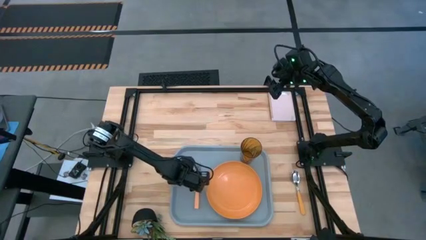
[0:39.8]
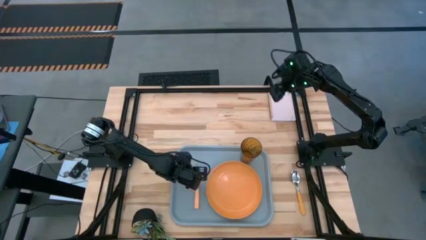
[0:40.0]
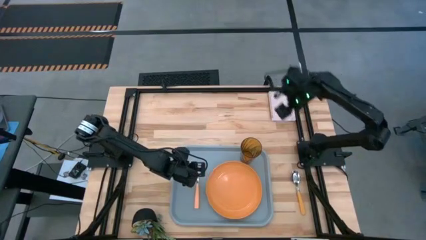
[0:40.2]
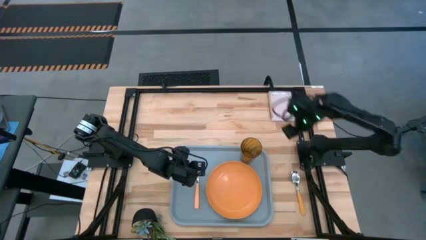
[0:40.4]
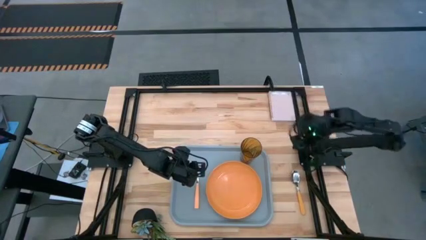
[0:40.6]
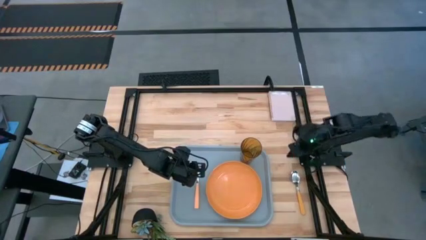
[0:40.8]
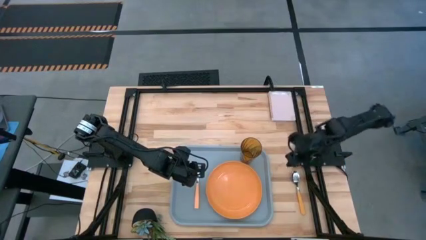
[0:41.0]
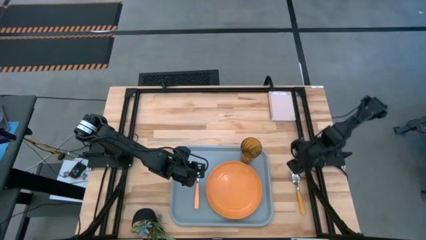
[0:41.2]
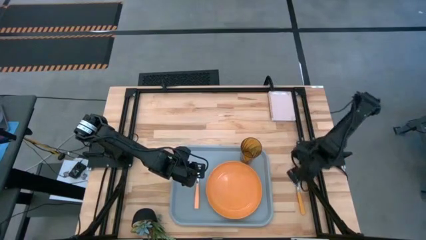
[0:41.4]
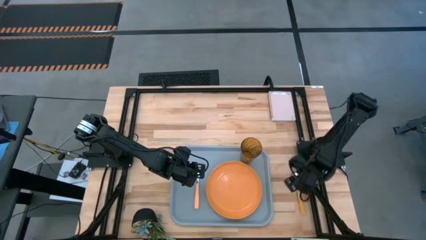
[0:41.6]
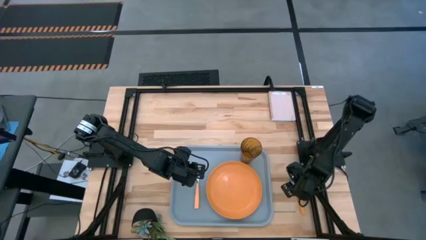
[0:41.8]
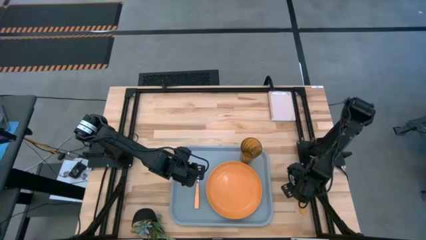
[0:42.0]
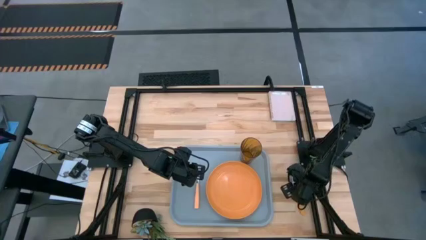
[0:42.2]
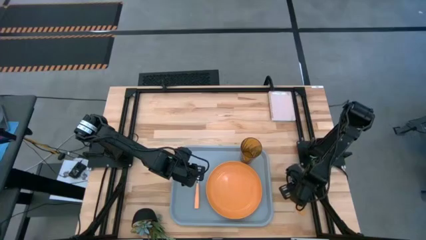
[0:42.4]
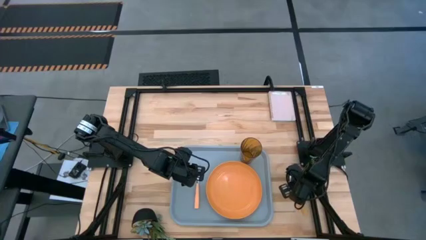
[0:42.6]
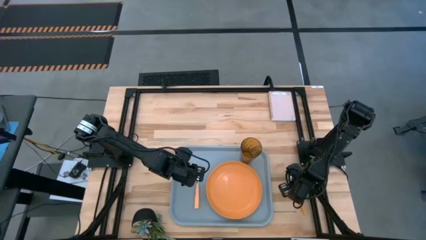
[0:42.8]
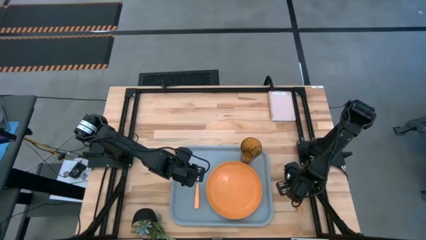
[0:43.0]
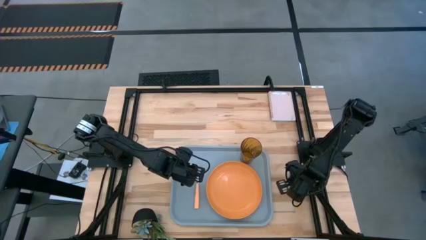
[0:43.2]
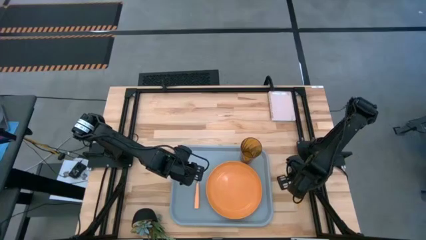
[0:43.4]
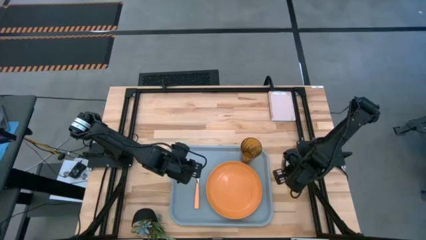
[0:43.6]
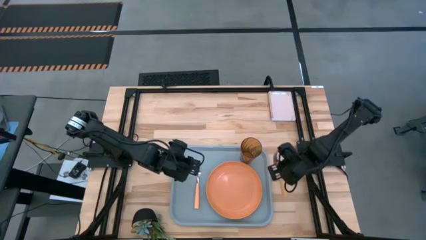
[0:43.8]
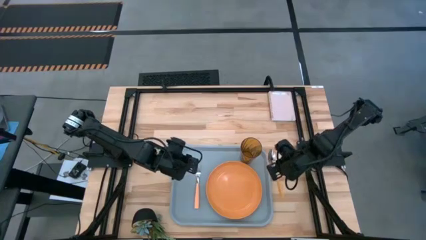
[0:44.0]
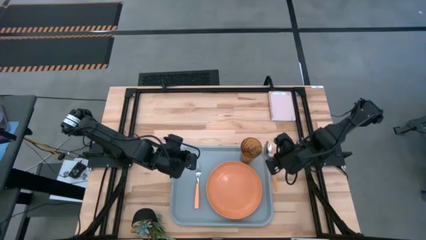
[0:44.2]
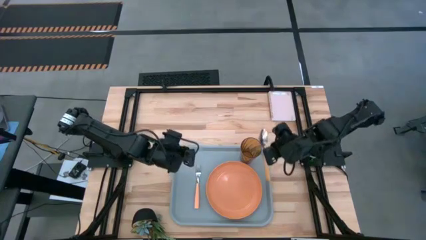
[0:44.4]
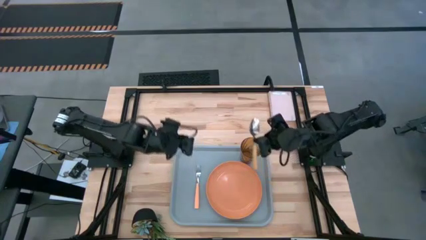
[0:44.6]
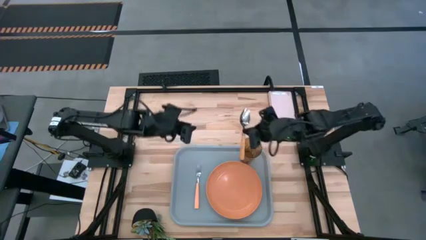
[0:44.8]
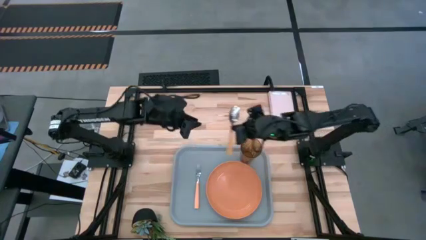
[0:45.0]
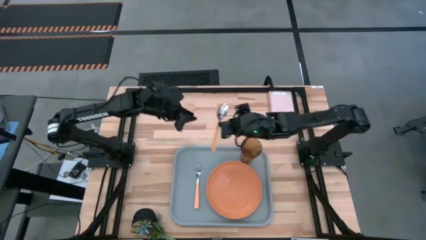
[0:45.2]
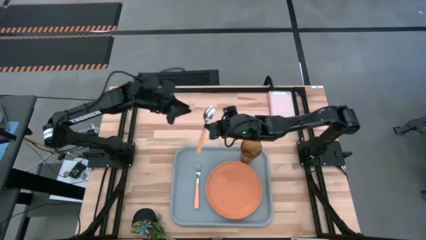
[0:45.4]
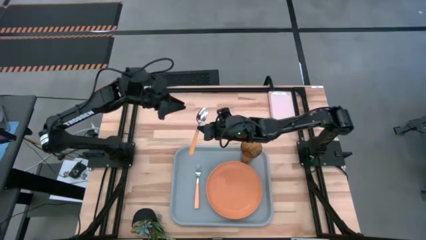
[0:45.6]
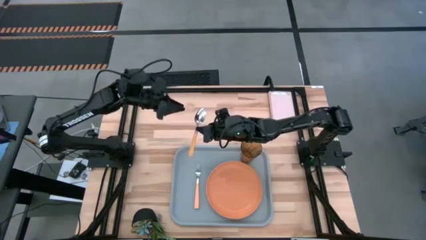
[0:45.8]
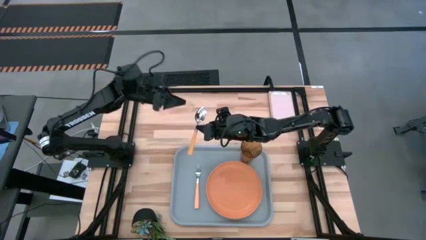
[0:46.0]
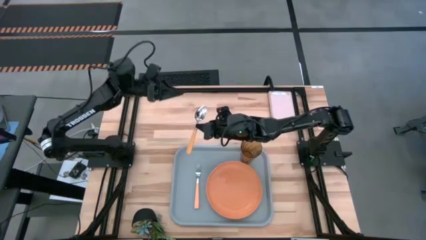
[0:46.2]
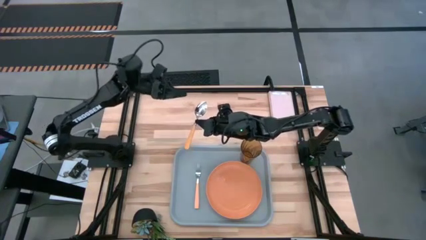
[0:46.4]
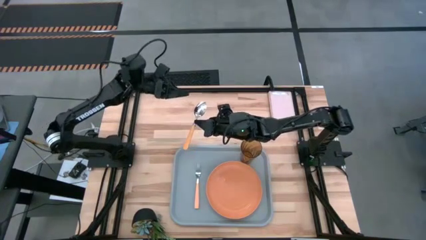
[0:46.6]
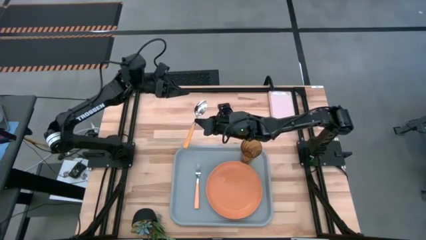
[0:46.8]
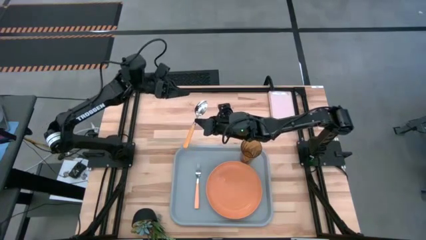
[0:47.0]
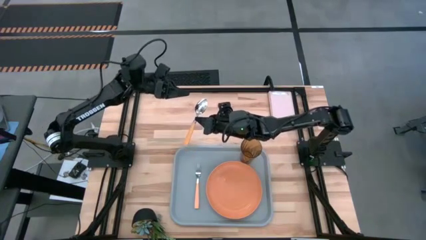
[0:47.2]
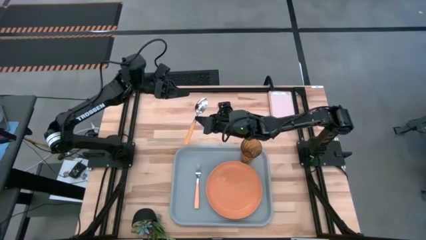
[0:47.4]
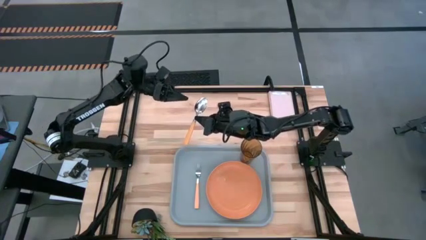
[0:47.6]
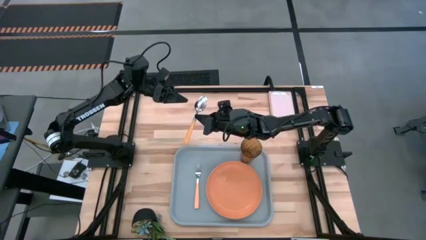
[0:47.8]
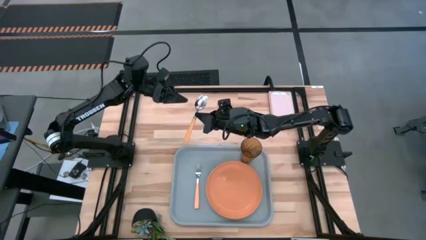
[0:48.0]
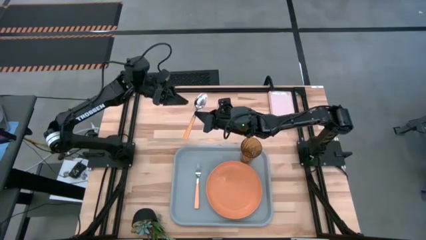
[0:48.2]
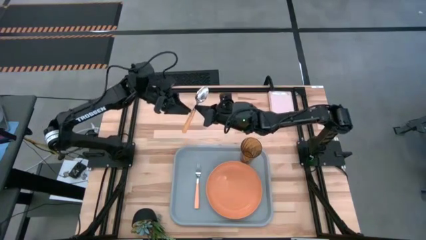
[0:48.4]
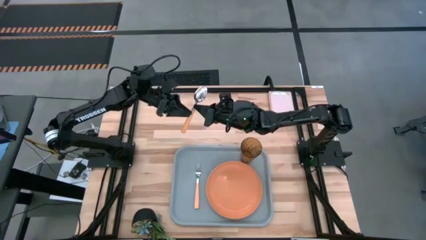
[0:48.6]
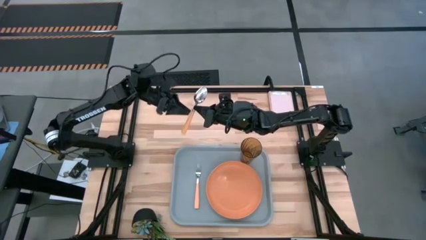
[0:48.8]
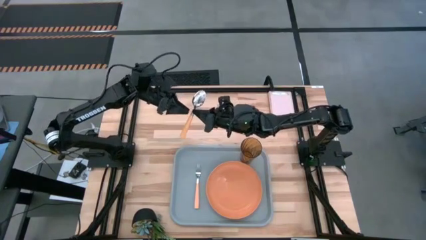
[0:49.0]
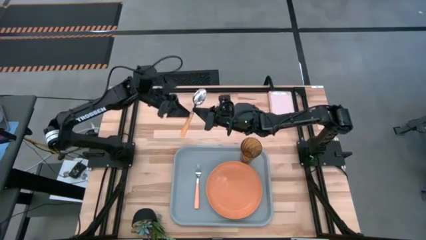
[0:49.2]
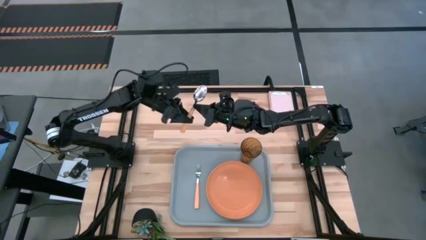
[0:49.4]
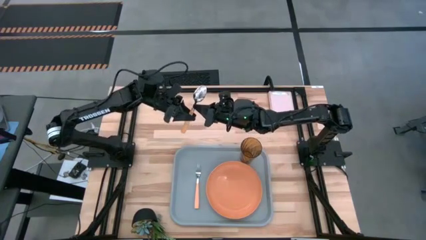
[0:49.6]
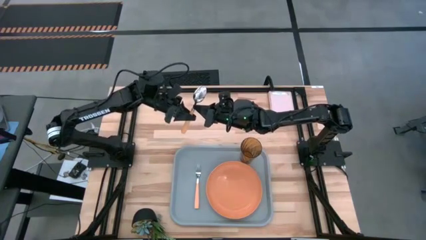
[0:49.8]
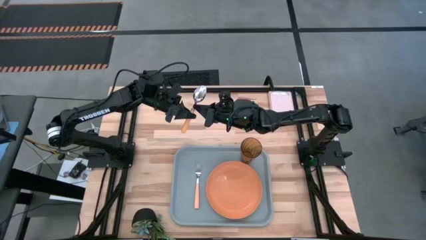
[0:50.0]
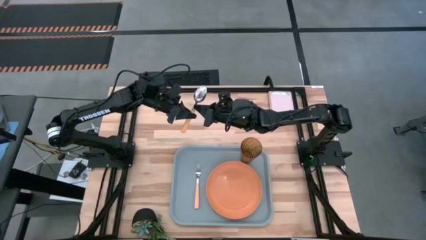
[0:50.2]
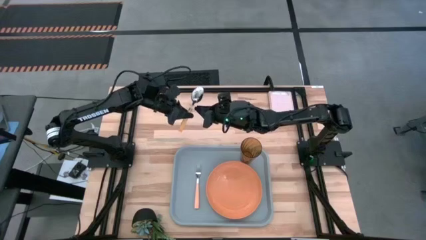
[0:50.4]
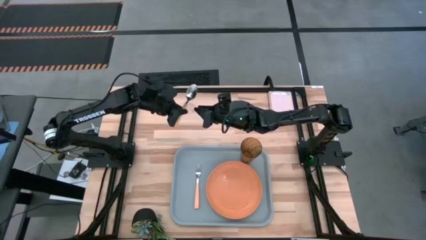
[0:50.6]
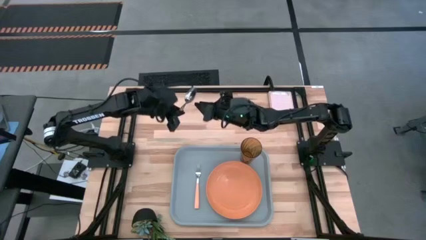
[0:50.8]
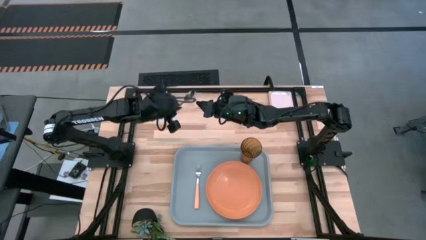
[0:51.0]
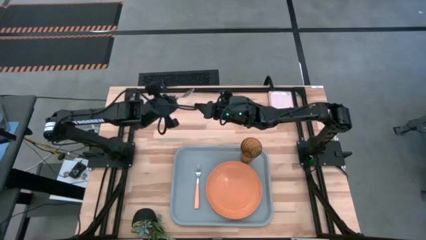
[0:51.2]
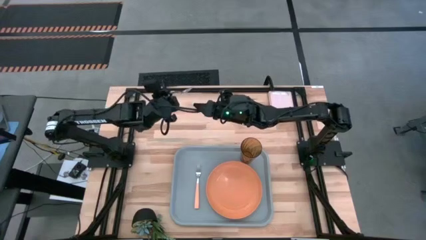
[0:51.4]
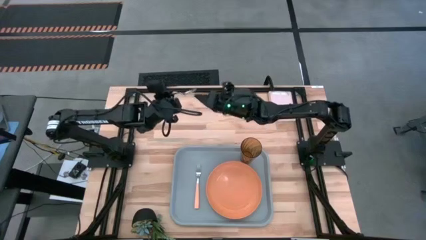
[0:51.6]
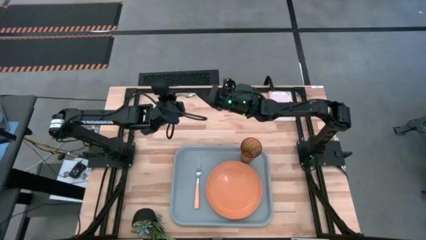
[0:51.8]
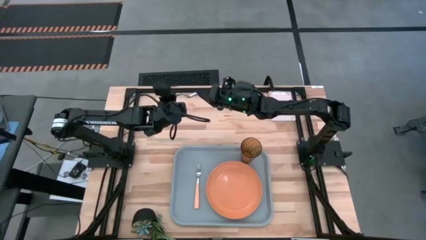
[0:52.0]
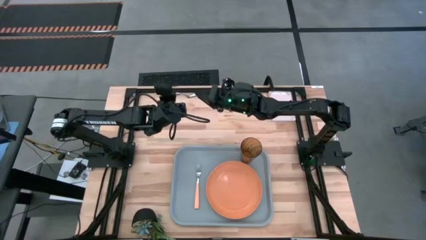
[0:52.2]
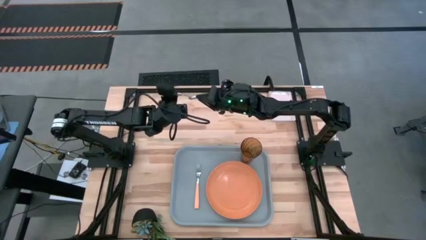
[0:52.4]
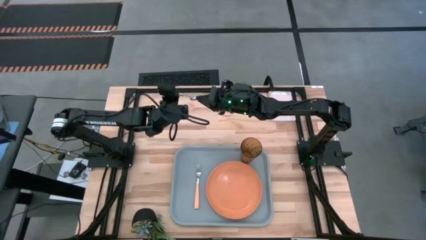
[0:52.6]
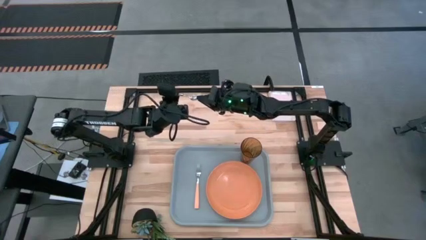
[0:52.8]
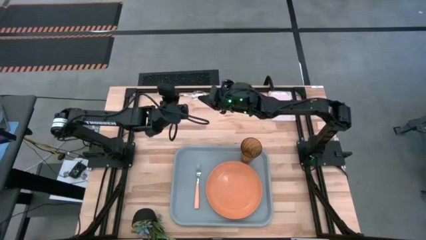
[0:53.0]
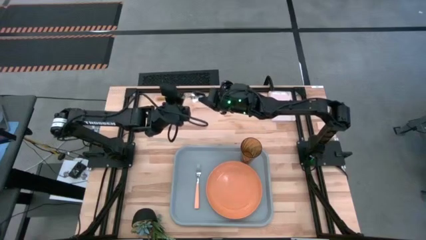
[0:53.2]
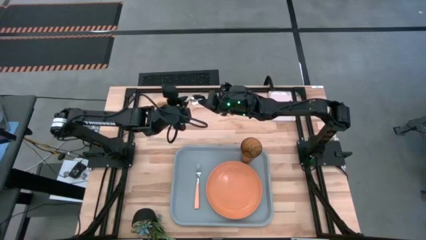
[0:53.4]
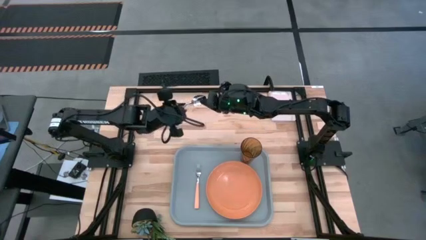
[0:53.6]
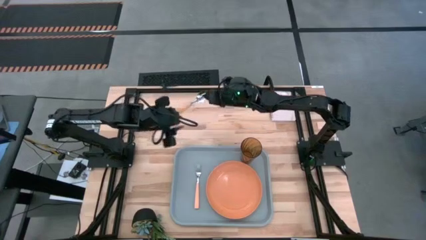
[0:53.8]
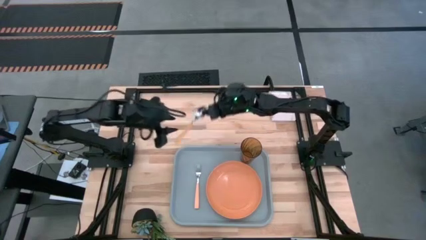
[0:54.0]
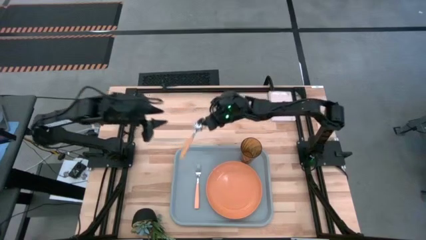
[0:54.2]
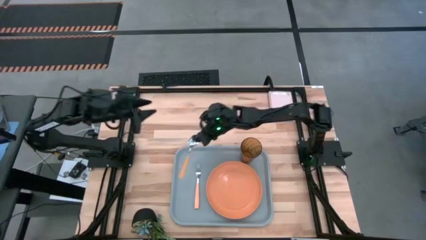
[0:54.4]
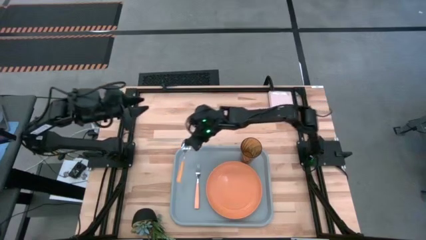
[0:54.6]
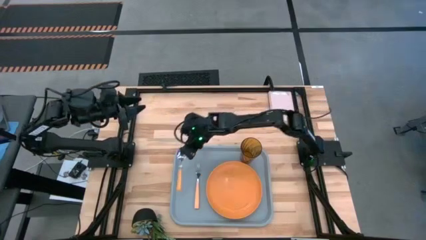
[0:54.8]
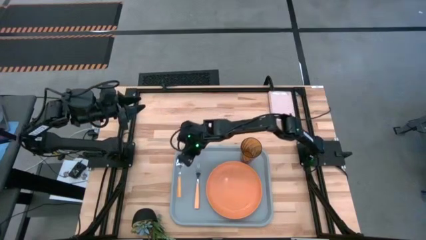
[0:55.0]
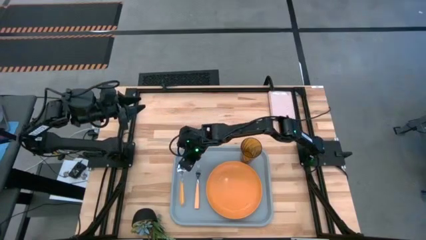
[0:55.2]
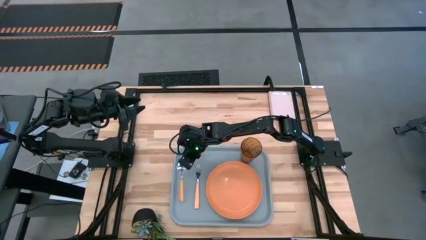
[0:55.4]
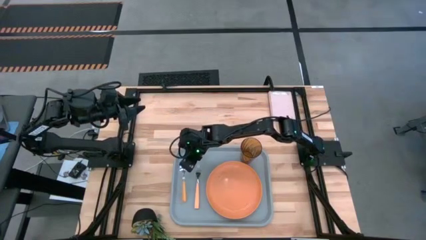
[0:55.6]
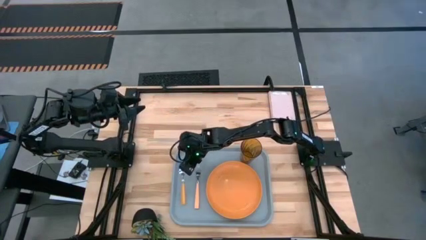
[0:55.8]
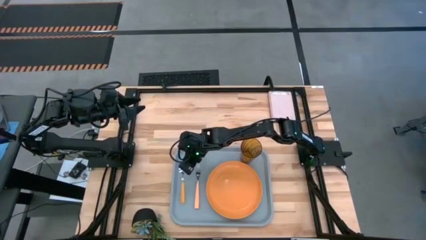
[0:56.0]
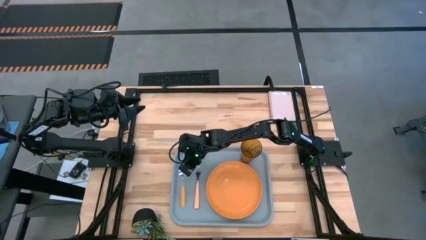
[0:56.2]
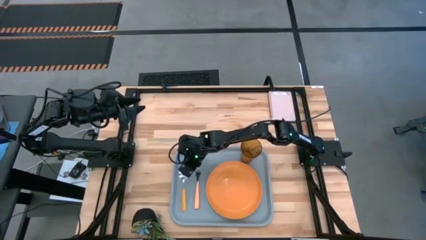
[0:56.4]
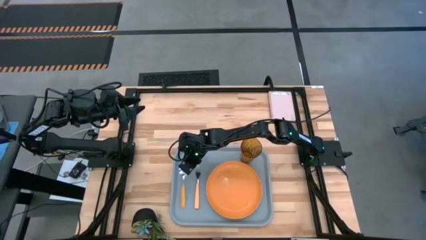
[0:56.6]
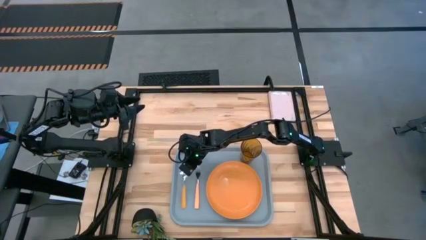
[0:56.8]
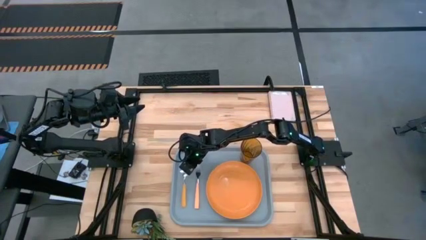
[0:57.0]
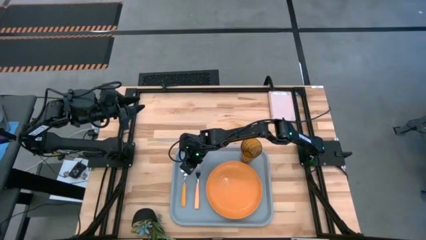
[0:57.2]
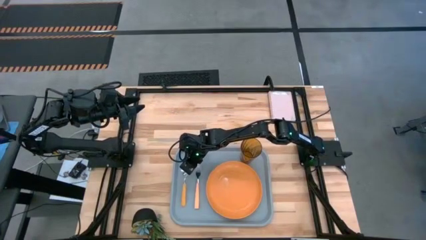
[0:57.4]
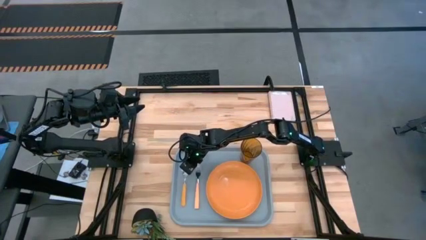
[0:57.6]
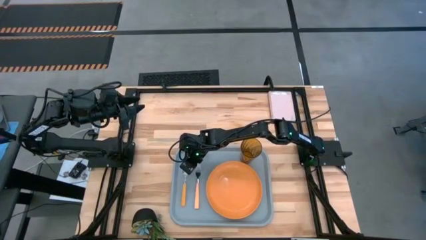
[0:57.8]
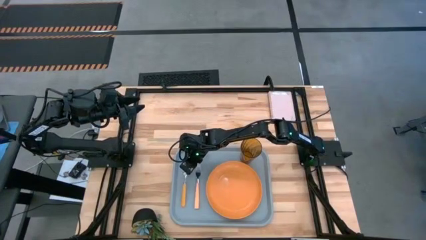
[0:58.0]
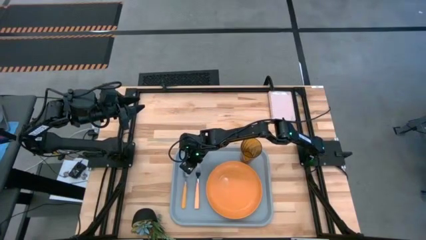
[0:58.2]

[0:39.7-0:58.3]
Task: Pick and place plate/cup/fork/spoon on tray
Put the yellow spoon to the left side of the orange fork on the blue serving tray
